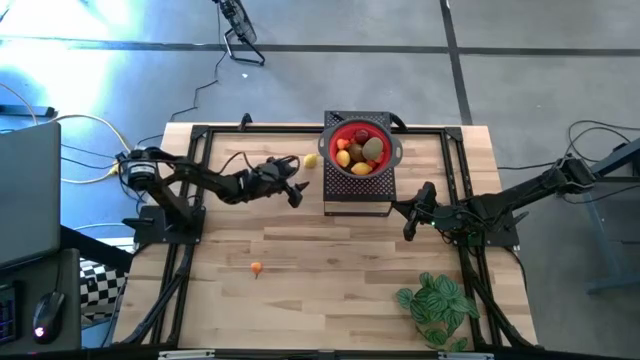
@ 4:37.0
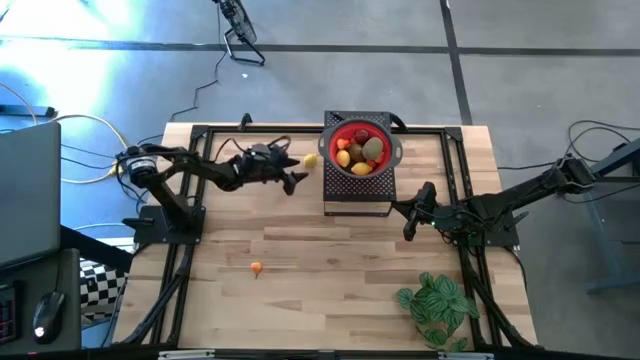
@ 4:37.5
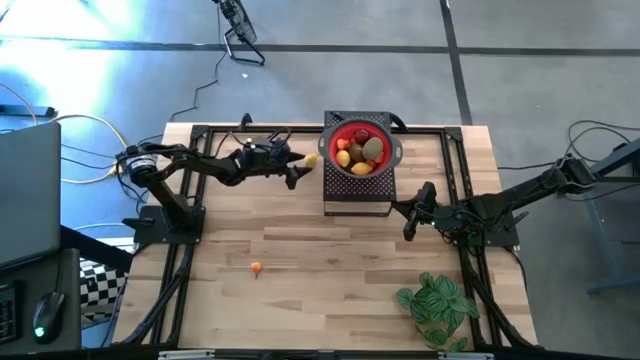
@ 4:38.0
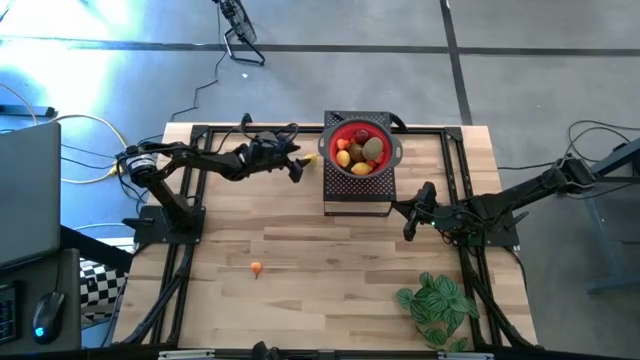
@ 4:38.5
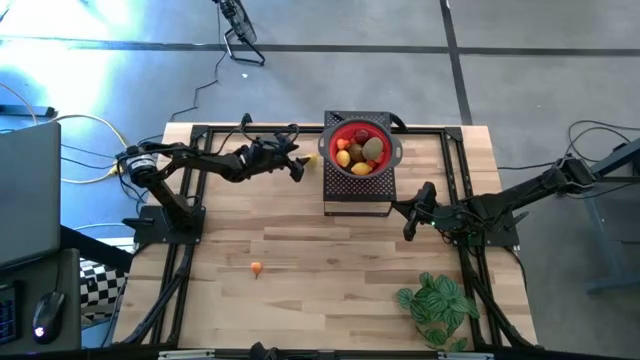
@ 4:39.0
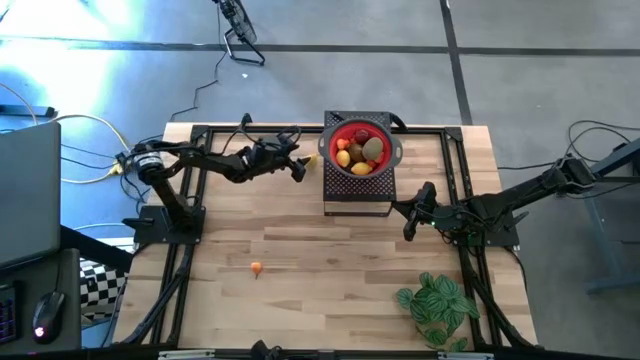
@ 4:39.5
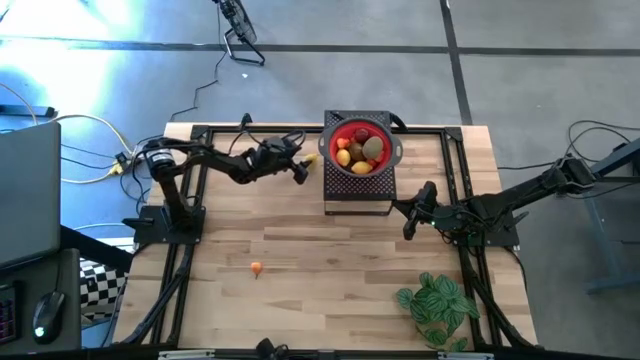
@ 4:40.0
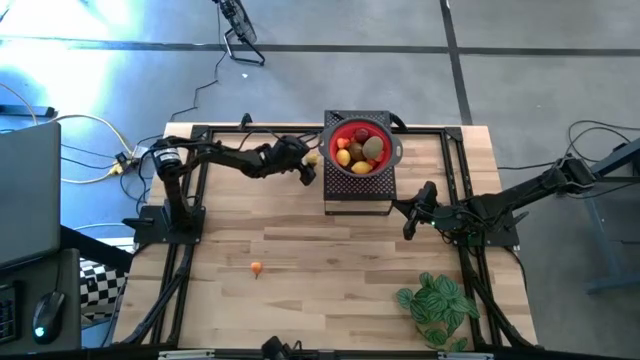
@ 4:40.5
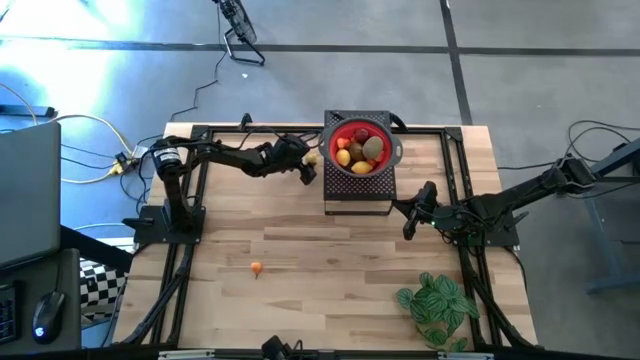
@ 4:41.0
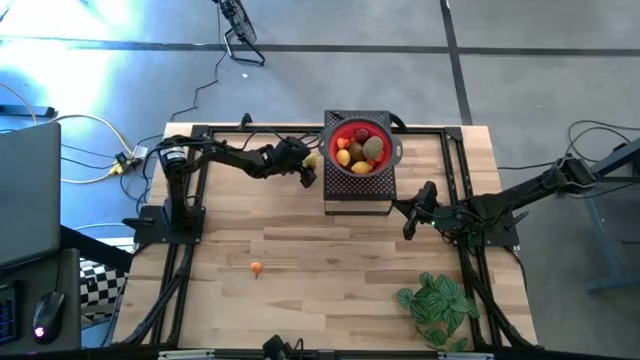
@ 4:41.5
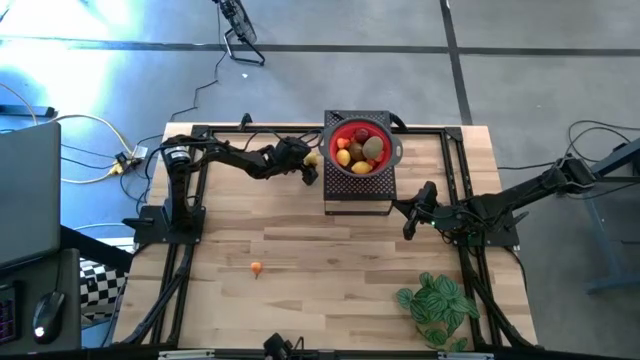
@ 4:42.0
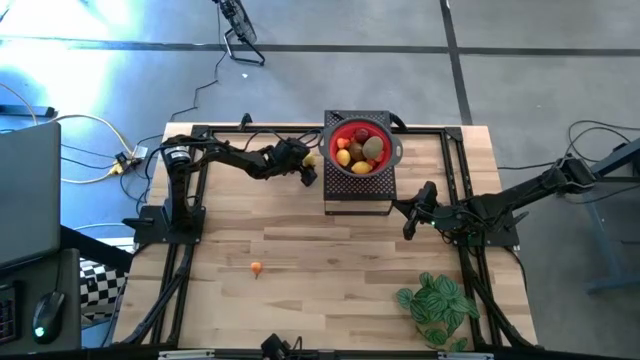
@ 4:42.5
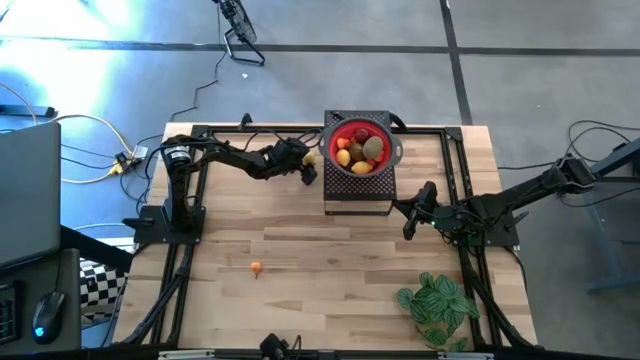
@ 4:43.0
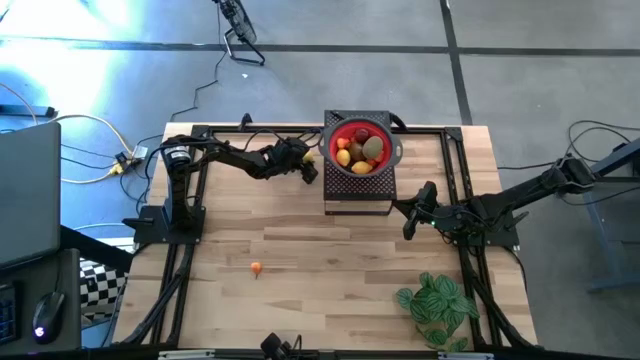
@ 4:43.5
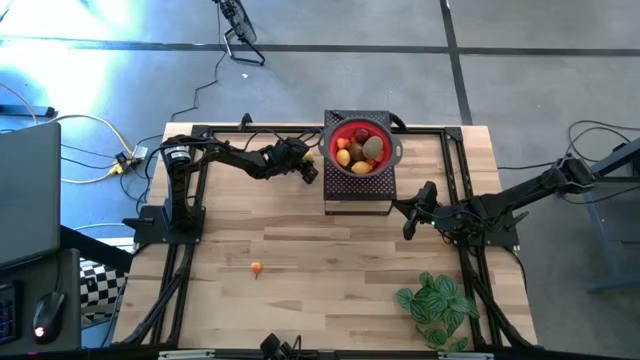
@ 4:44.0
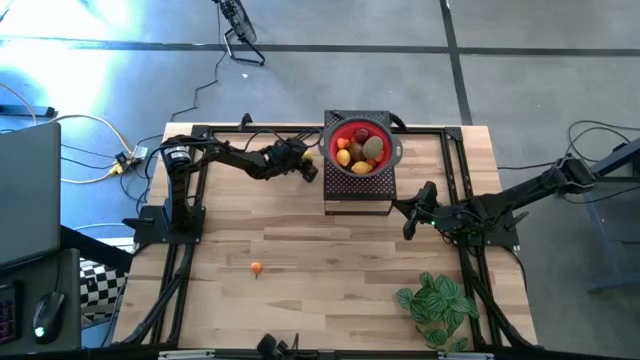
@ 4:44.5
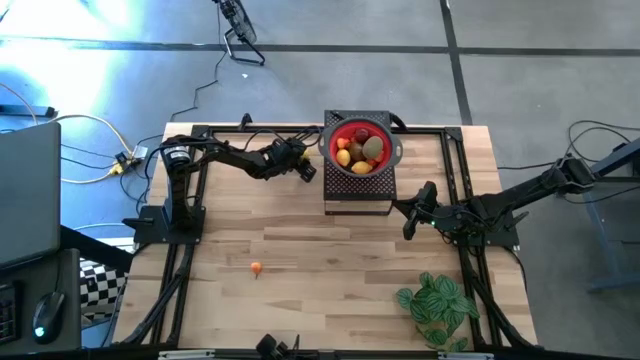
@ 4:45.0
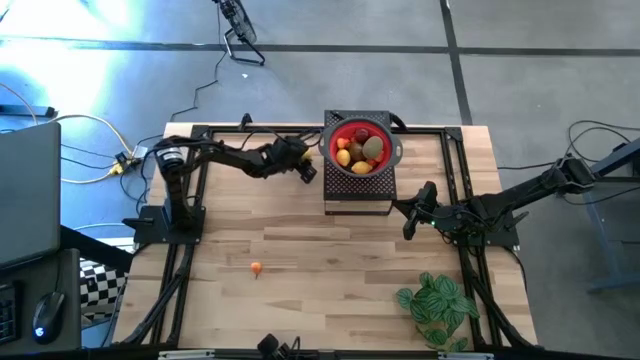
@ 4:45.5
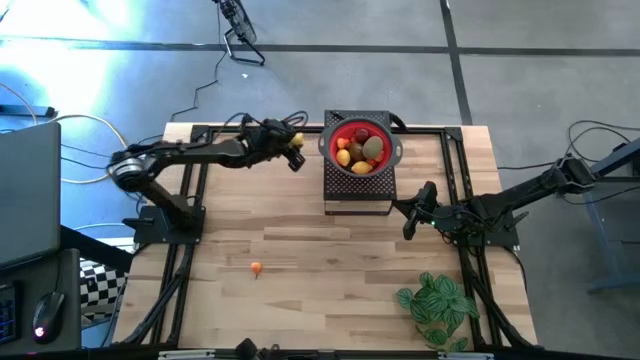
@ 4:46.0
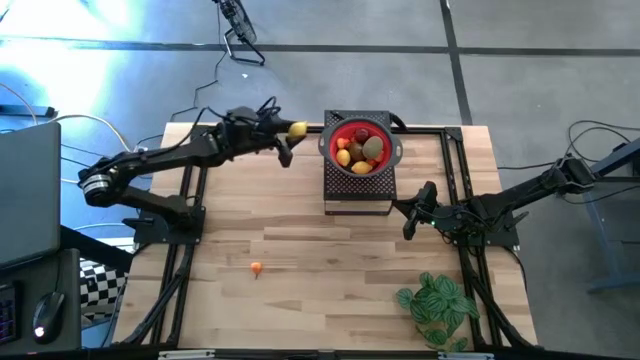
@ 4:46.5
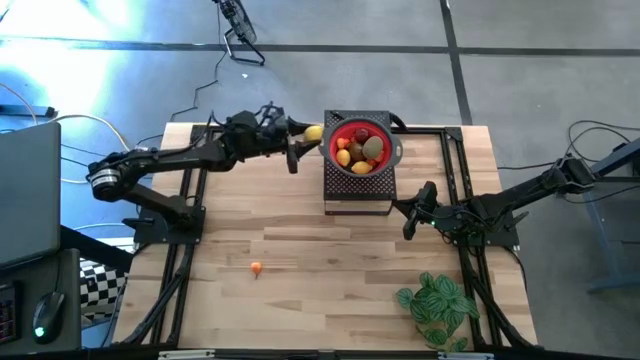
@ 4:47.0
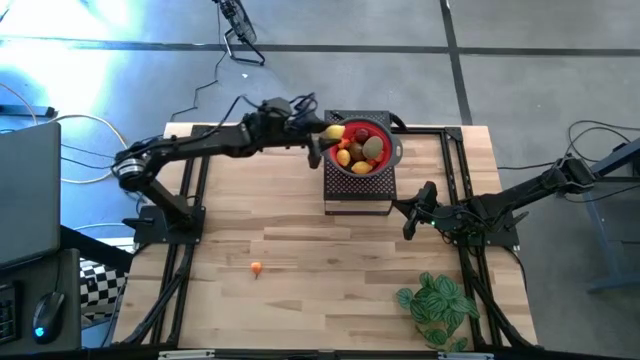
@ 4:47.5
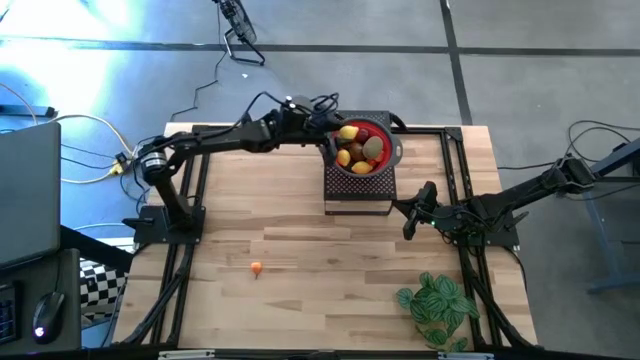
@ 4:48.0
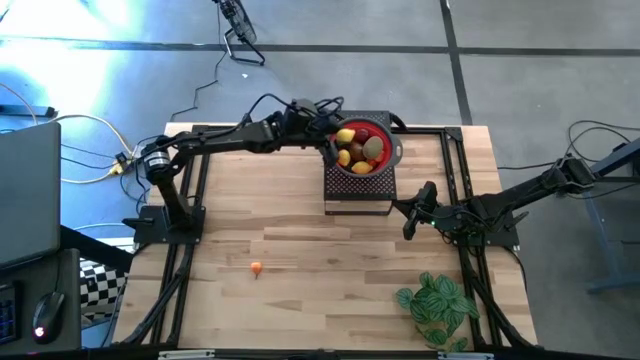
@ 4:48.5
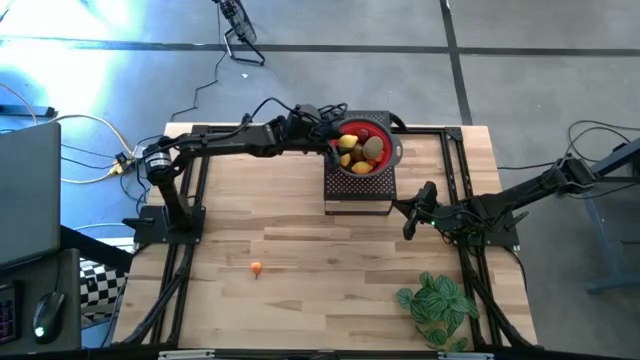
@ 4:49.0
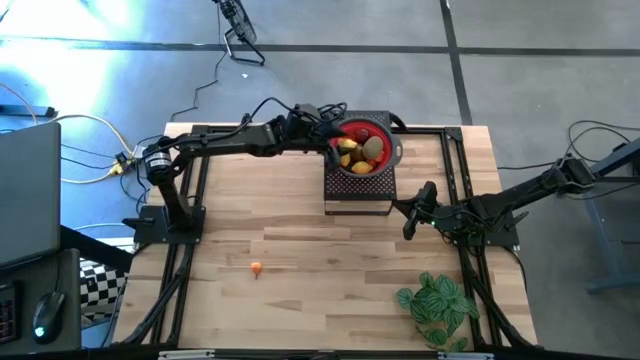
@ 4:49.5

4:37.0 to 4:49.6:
Task: Pick & Place Fruit
Put the yellow lemon into the red strainer bowl on the shelf

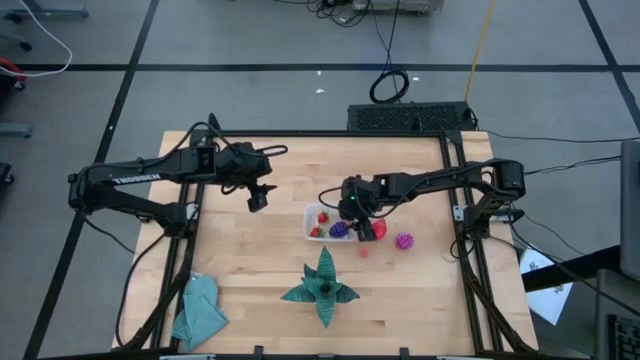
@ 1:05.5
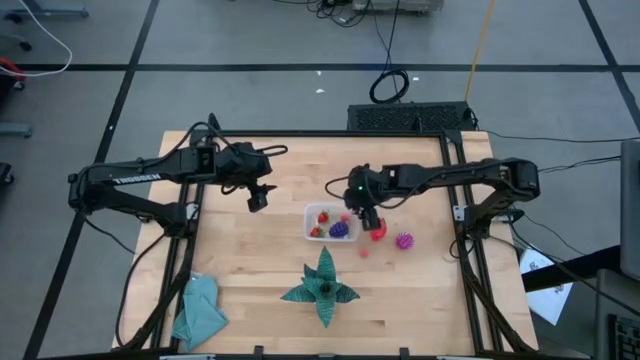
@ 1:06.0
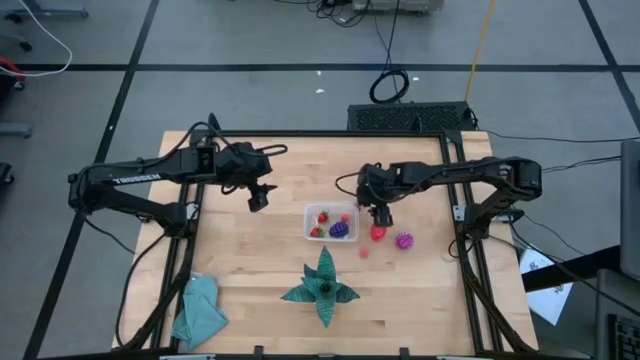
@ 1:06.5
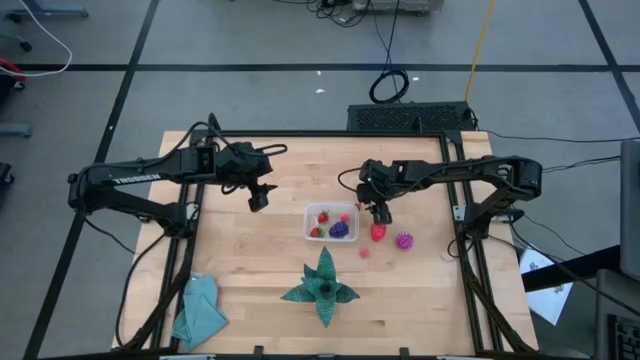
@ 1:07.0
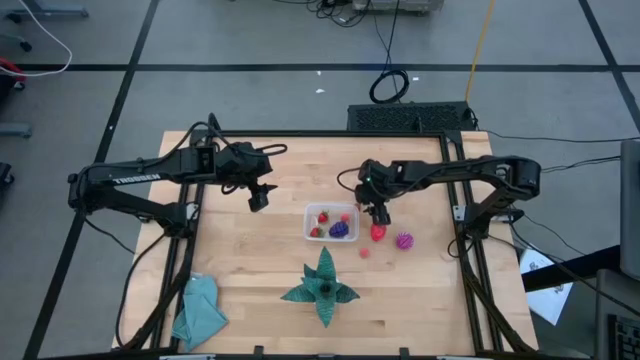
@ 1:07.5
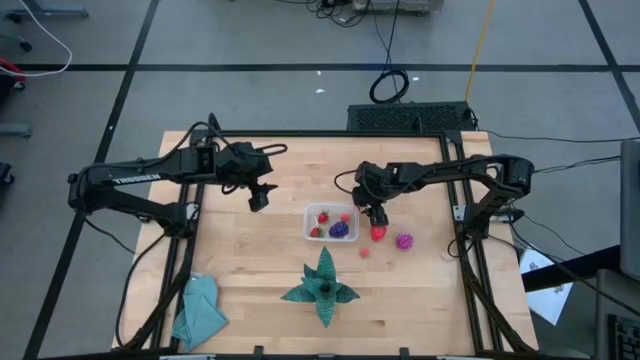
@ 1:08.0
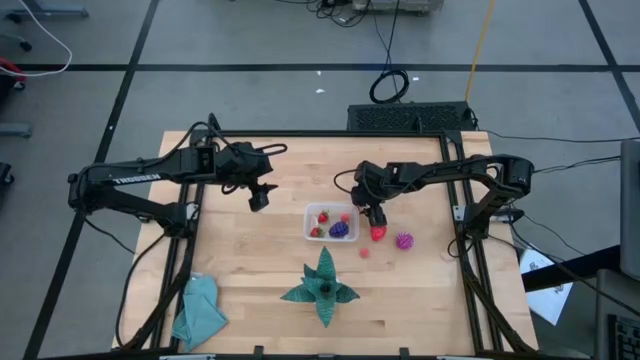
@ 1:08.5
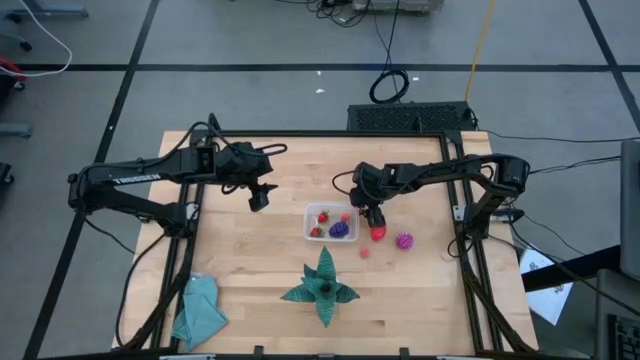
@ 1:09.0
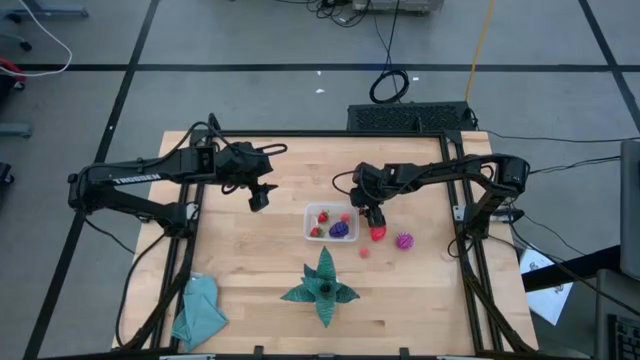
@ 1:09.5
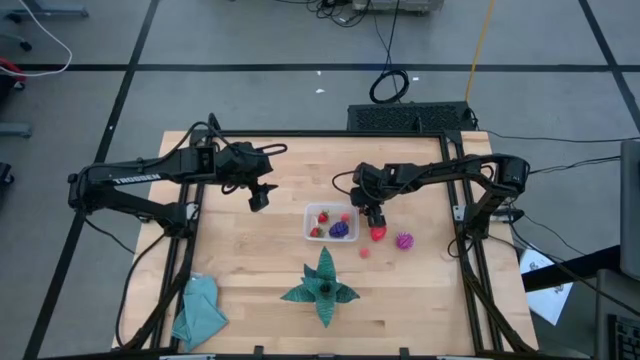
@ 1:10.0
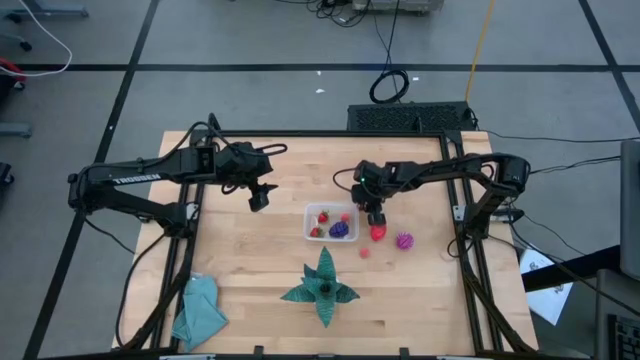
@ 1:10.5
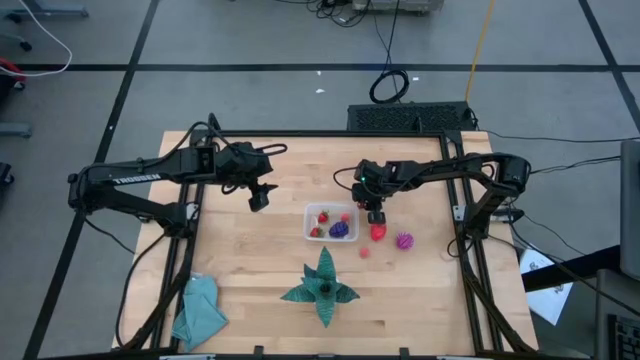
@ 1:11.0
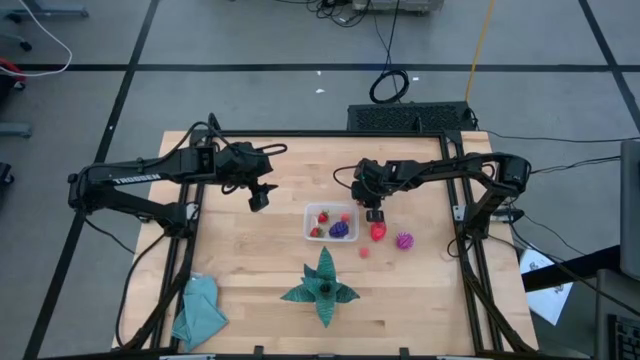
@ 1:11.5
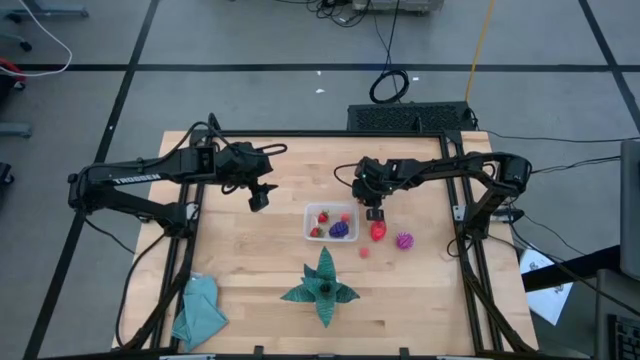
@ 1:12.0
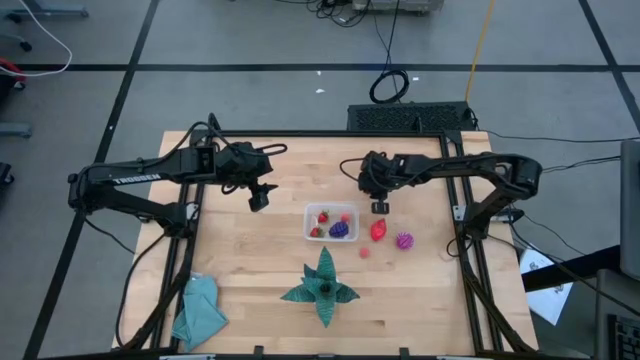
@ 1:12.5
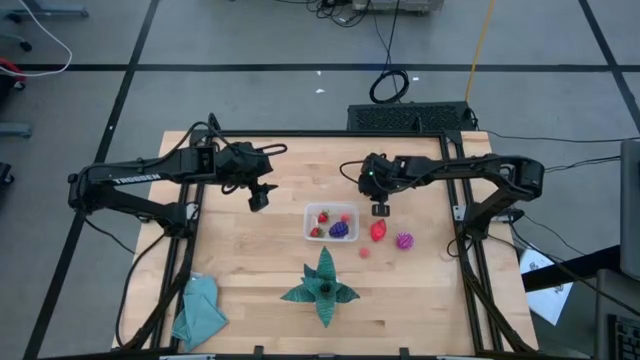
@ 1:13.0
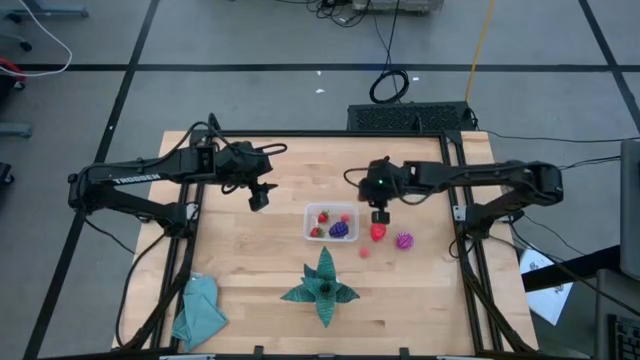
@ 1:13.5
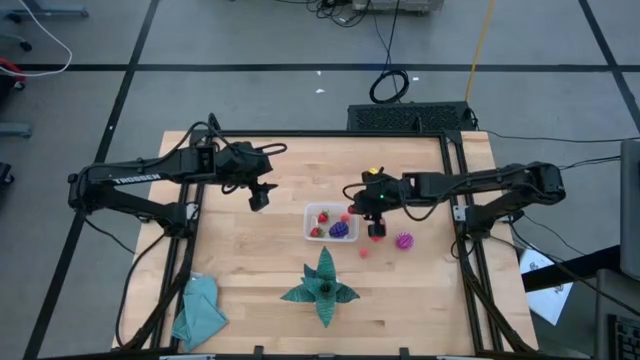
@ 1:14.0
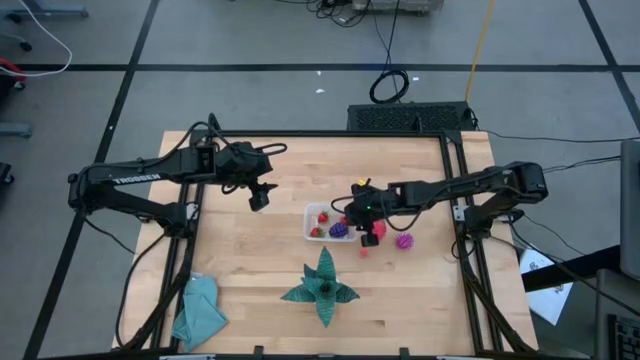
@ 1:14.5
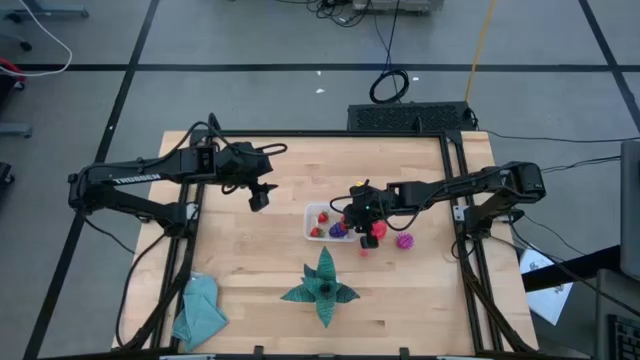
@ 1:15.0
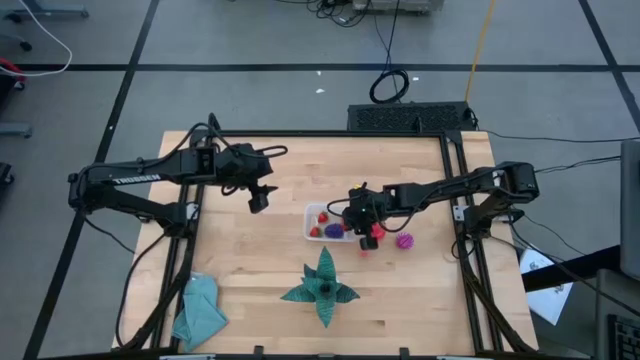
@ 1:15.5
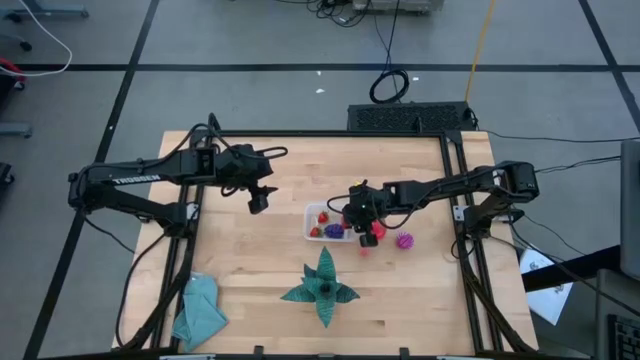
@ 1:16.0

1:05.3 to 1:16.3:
Task: Pick and placing Produce into tupperware
Put the red cherry into the transparent bin
